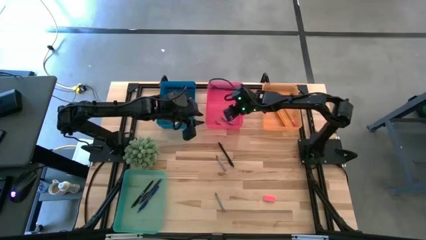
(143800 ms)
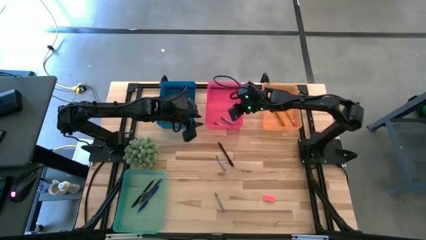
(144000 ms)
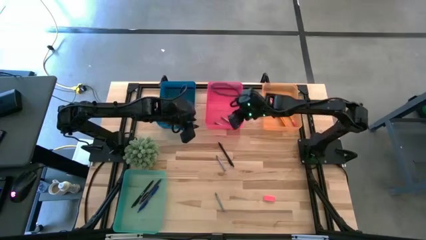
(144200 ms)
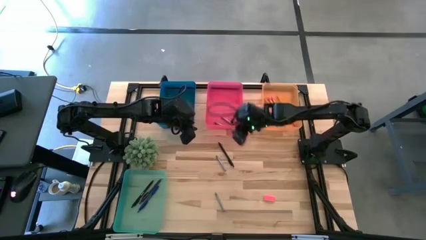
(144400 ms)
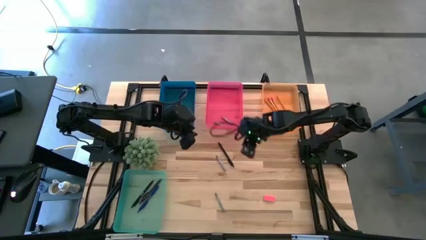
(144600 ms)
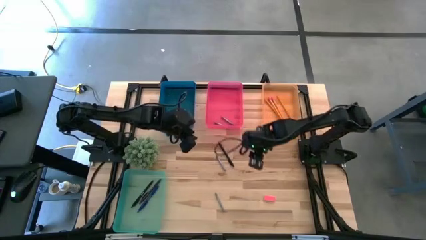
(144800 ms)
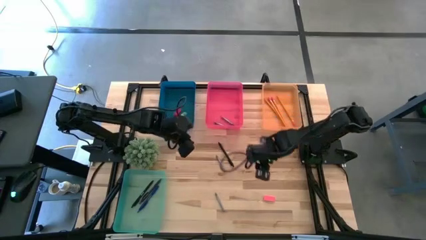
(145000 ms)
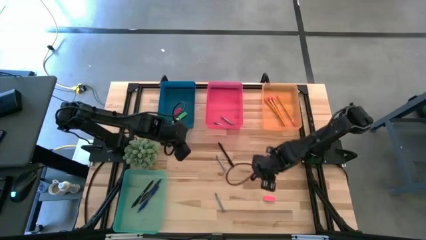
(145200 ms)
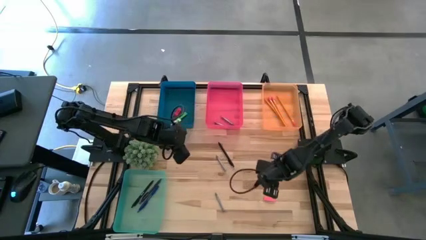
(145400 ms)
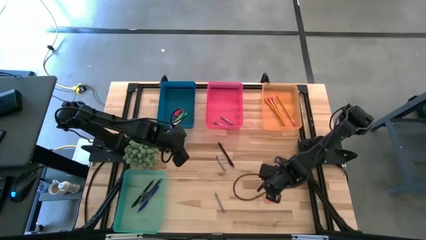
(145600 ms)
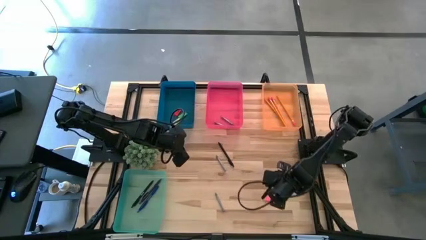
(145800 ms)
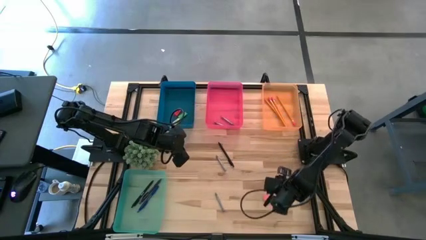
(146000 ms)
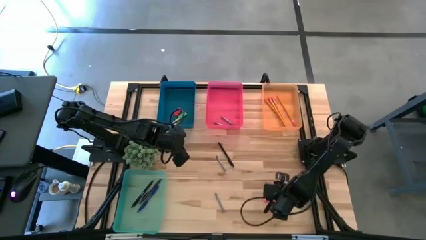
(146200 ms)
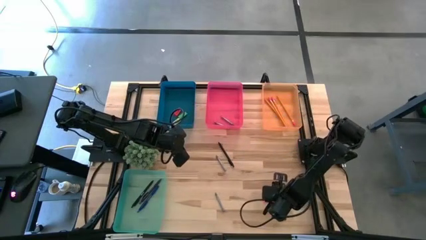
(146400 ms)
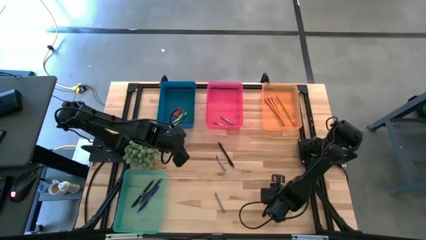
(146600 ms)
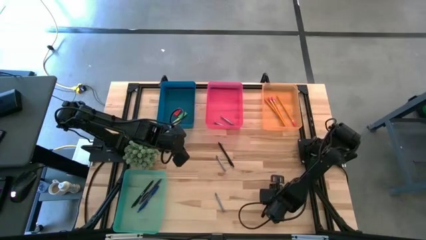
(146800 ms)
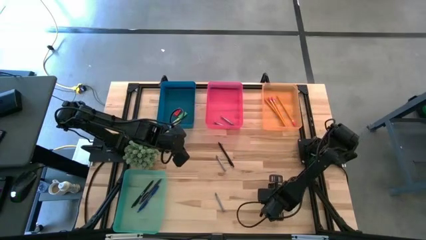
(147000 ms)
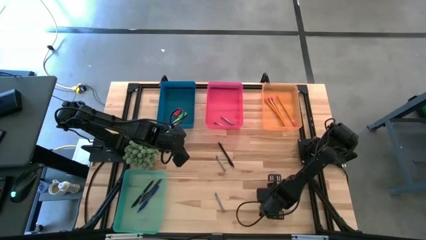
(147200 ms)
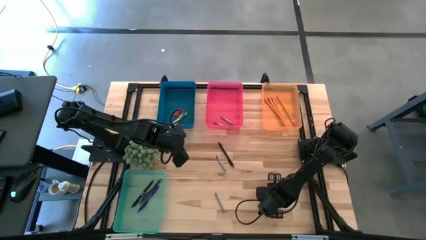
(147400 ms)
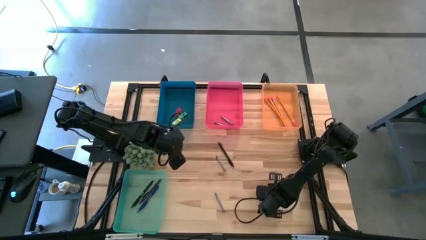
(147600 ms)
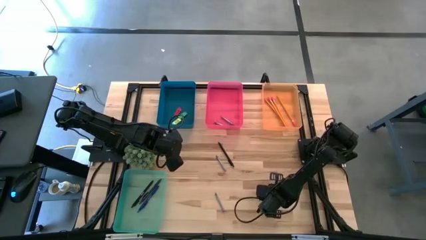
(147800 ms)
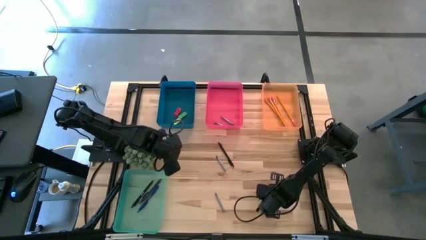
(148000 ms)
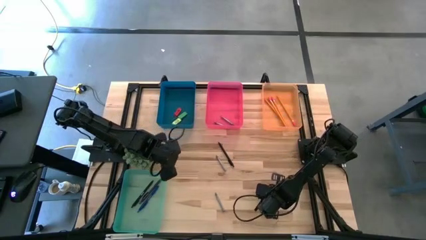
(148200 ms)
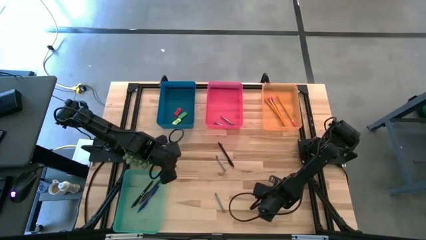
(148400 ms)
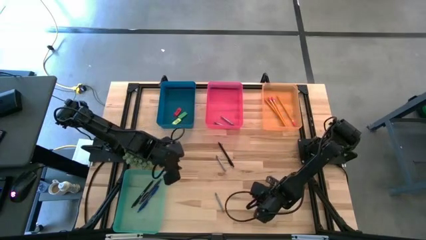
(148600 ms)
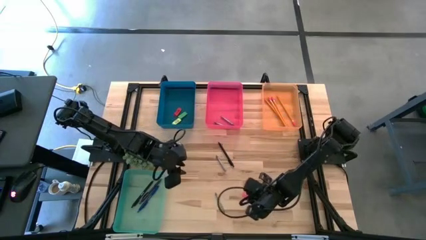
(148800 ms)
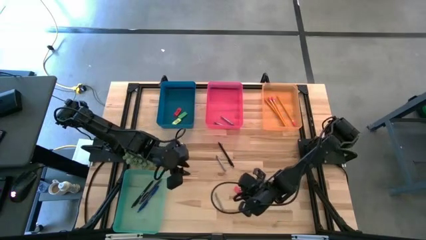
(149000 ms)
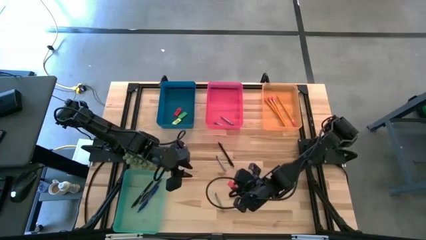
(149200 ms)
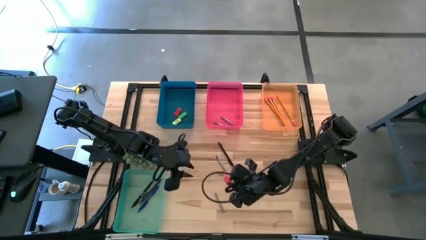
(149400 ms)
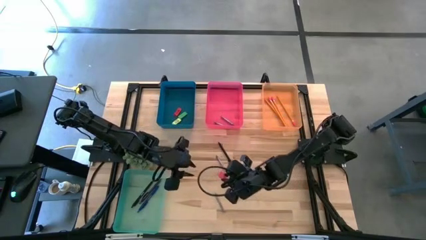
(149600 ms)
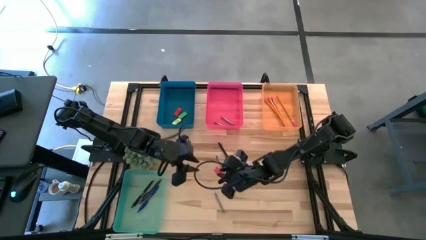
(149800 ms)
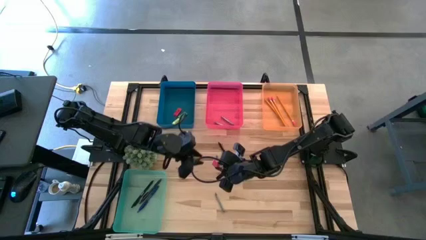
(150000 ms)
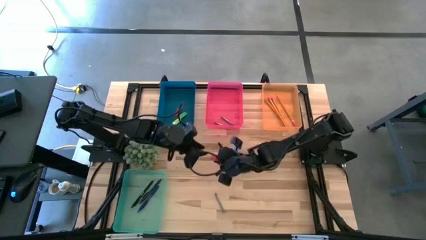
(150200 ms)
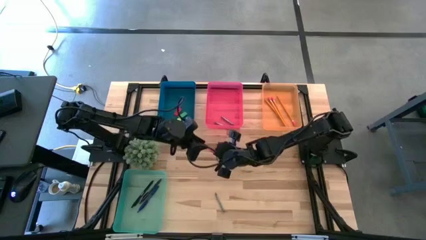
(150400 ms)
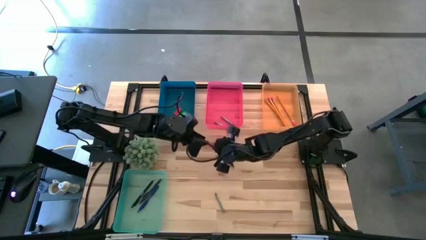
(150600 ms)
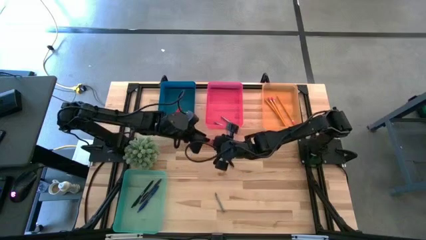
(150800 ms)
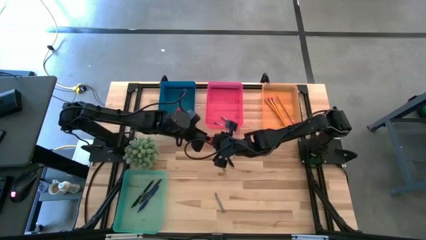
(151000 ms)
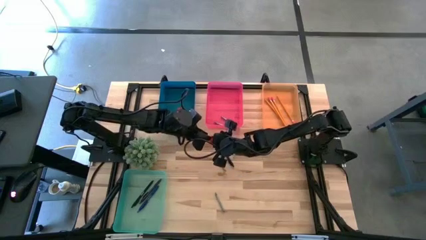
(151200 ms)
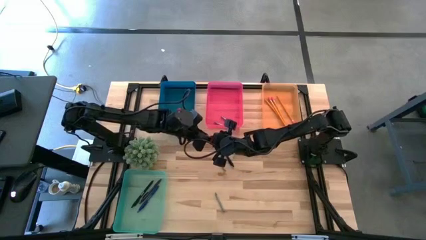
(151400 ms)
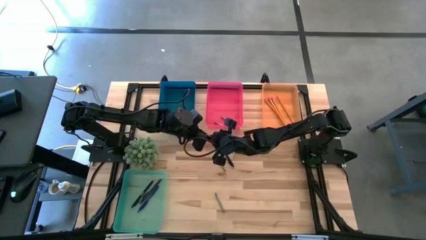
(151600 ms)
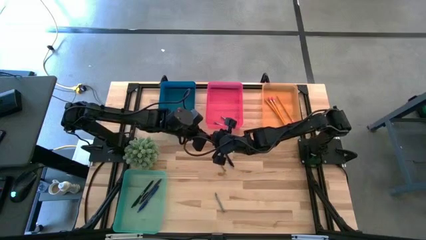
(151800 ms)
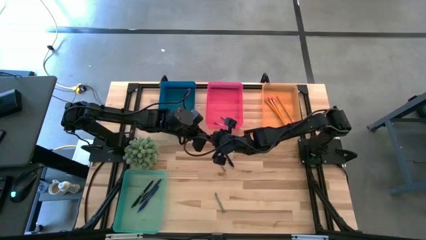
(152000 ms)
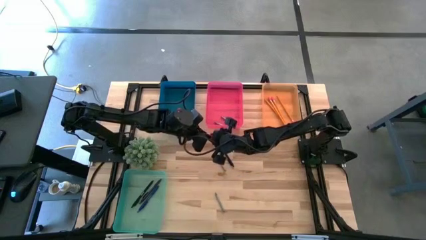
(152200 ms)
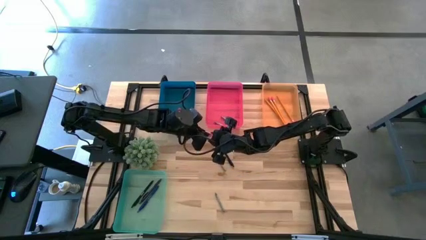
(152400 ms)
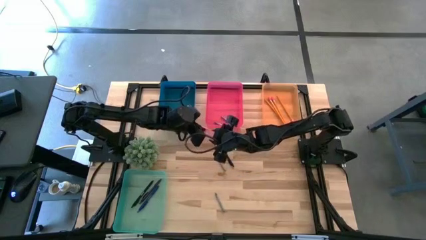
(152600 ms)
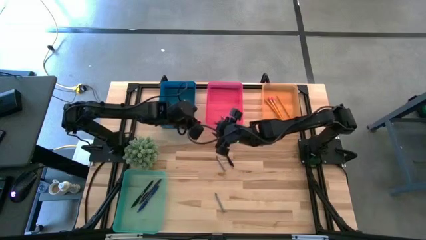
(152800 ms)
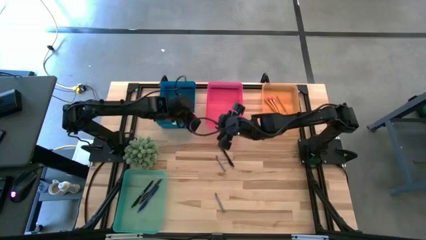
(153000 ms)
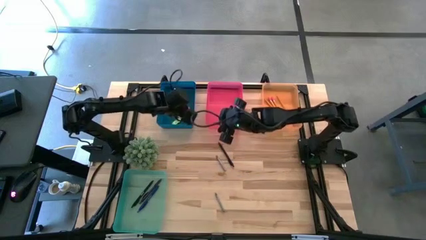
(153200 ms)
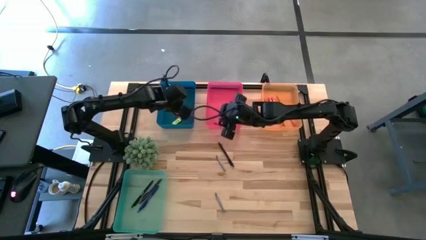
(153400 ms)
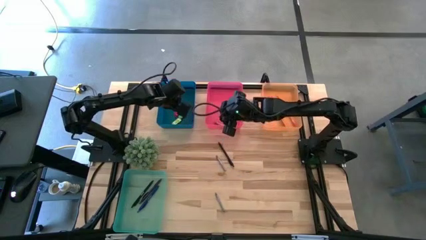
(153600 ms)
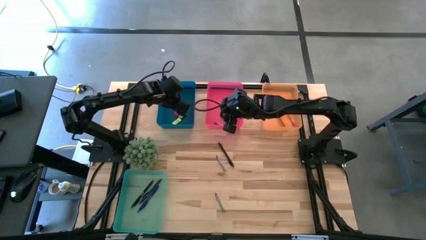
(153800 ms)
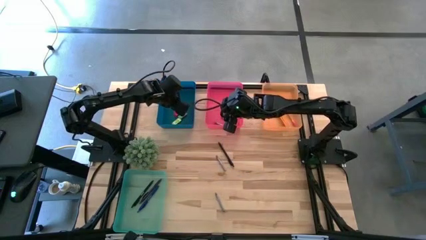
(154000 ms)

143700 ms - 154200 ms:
Task: Sort crayons/erasers/pens/pencils in bins
Put the pink eraser into the transparent blue bin

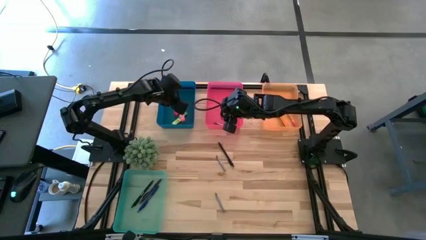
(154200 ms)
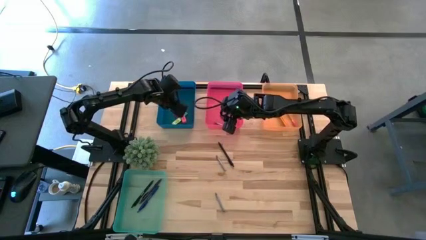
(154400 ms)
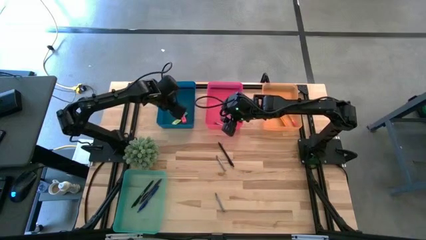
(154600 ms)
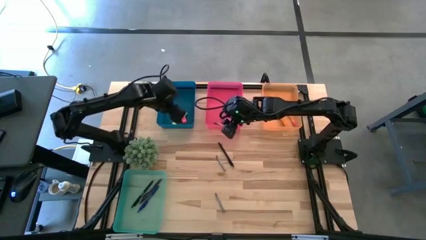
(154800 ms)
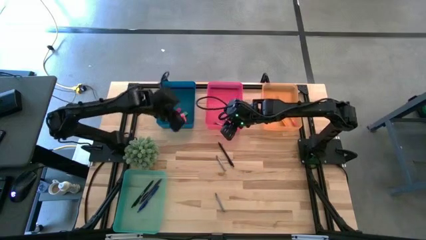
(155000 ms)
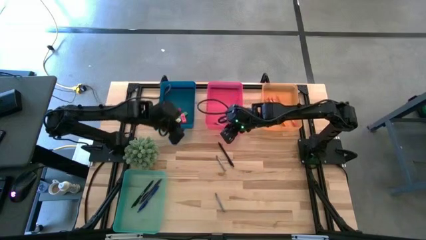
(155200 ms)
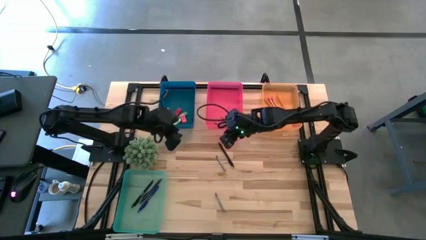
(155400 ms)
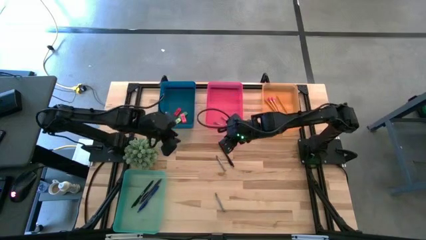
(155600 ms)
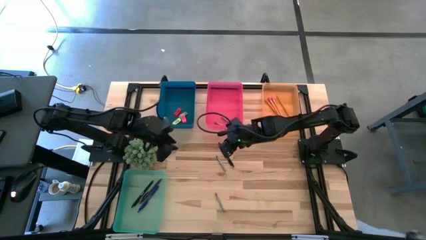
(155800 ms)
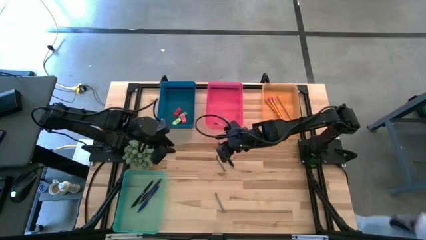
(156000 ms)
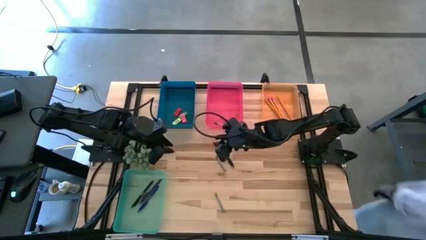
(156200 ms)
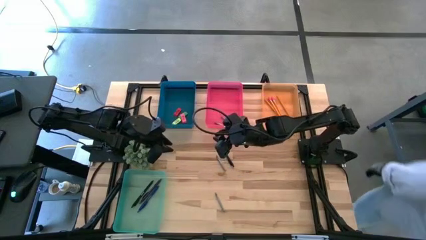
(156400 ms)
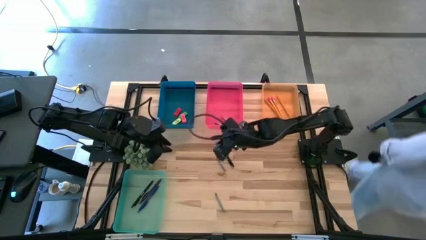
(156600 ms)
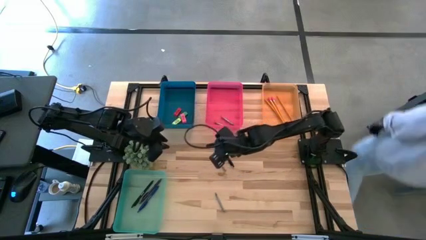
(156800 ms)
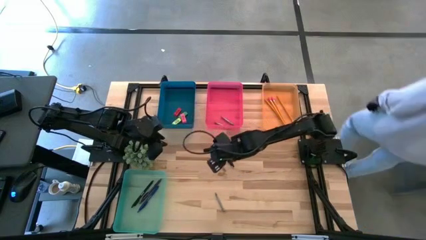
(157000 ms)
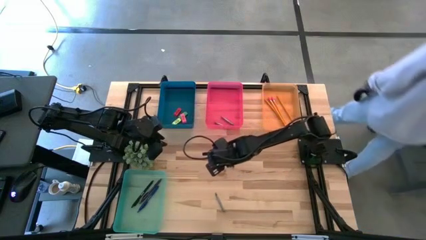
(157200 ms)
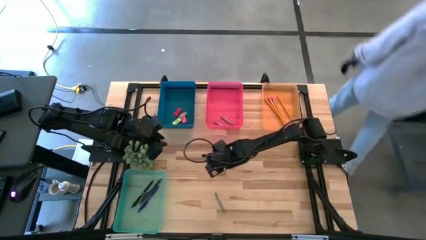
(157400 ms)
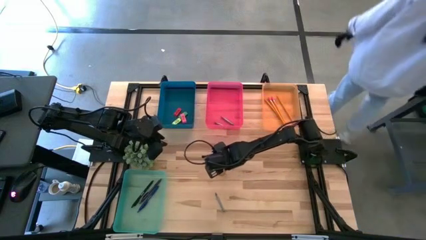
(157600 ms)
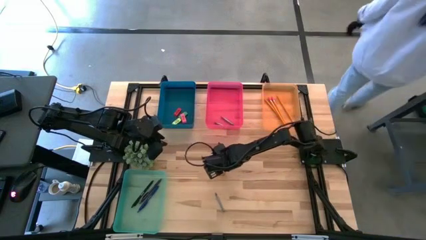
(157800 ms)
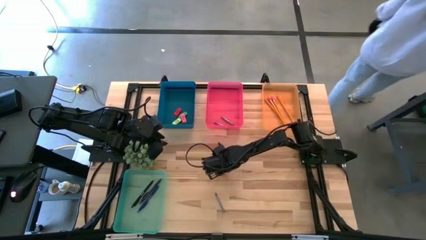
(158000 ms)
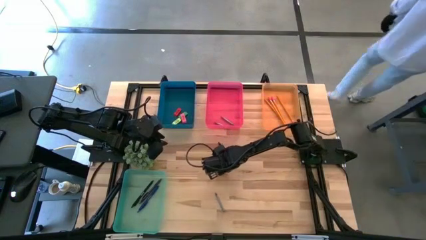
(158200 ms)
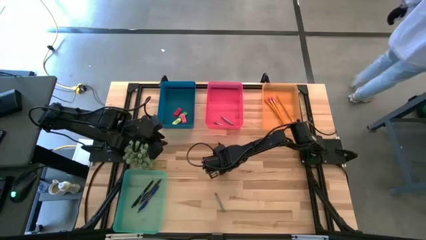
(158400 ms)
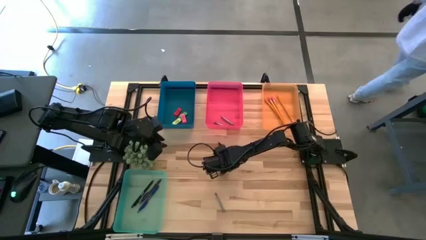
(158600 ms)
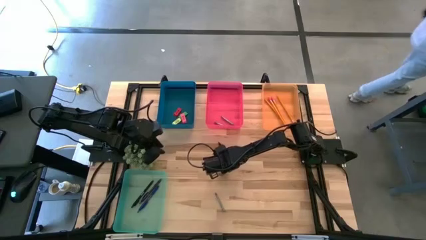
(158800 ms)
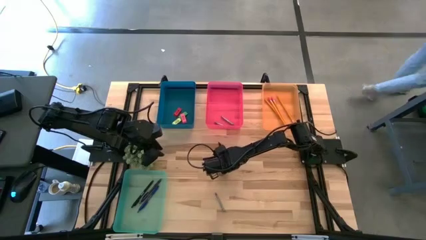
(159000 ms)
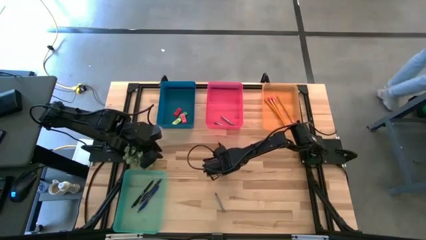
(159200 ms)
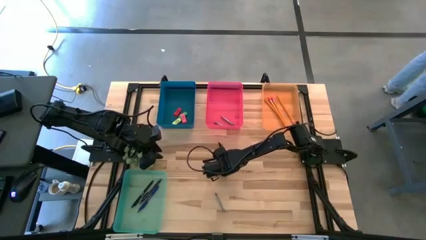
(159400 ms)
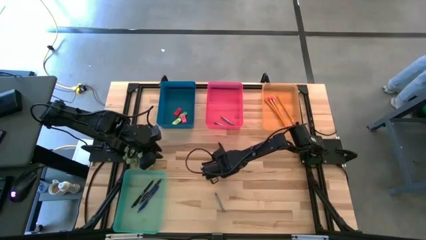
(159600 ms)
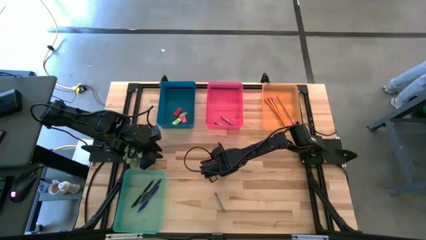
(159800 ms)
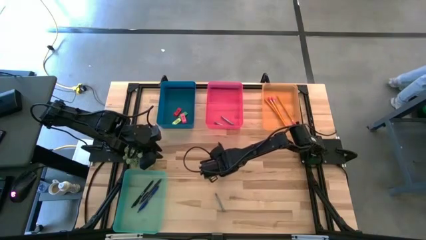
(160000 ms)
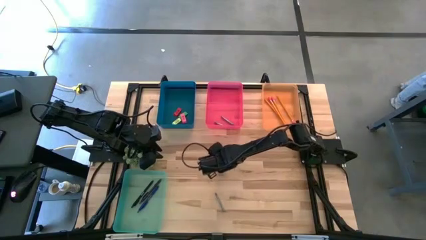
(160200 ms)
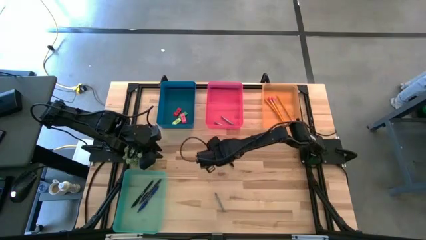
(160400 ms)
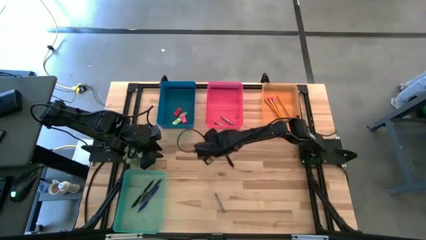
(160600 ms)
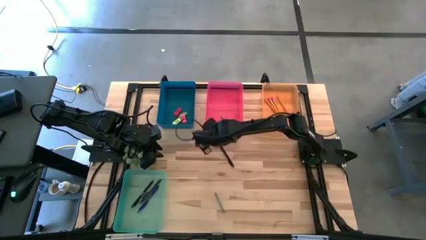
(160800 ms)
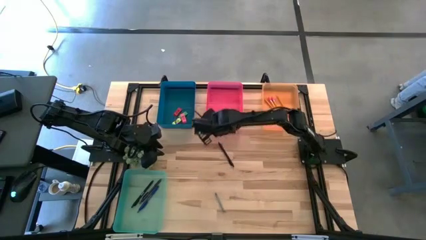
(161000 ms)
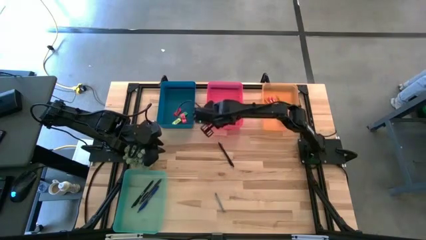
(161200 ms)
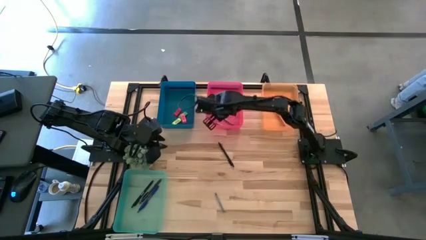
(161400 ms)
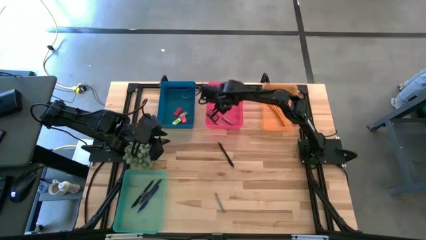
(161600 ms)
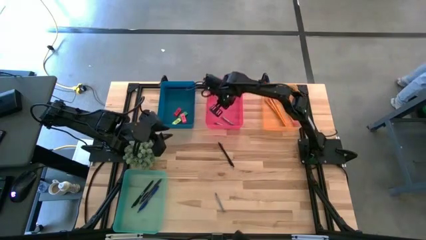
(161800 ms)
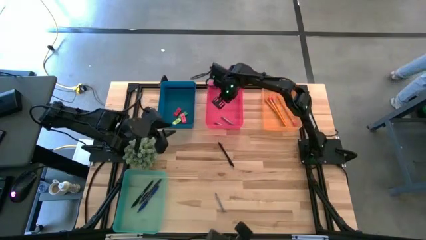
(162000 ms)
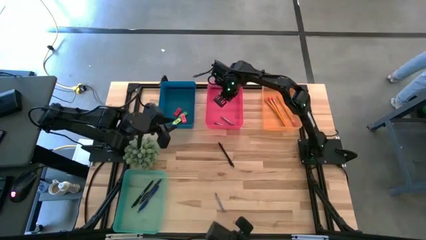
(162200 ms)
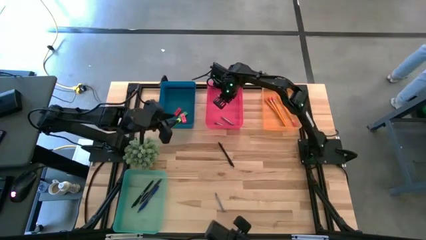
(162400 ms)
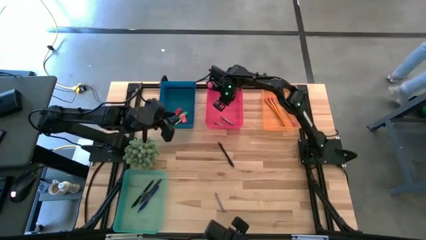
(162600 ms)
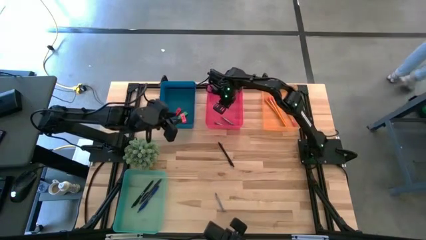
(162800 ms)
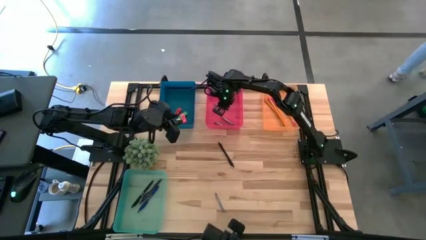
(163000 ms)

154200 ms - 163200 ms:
Put the top gray crayon into the transparent red bin
